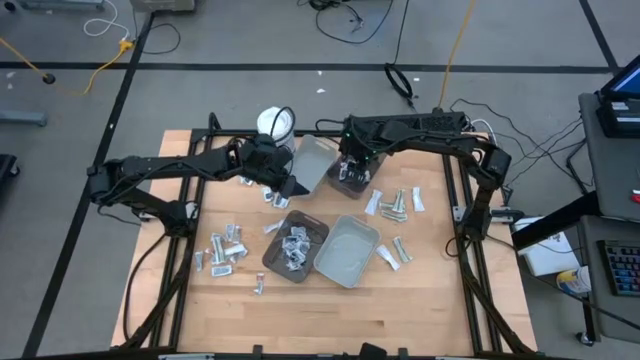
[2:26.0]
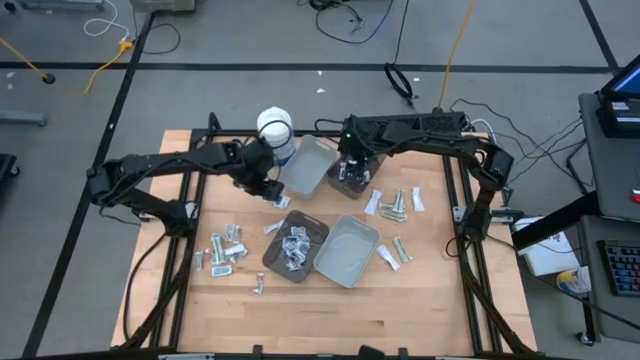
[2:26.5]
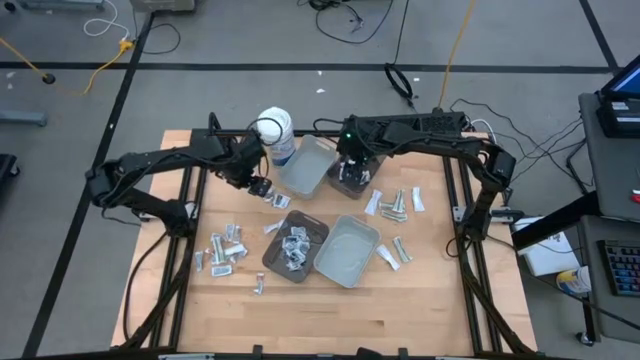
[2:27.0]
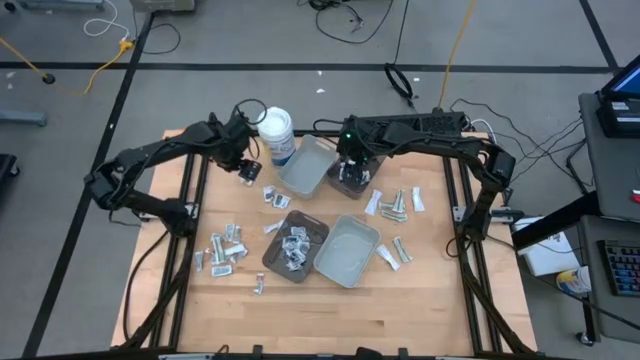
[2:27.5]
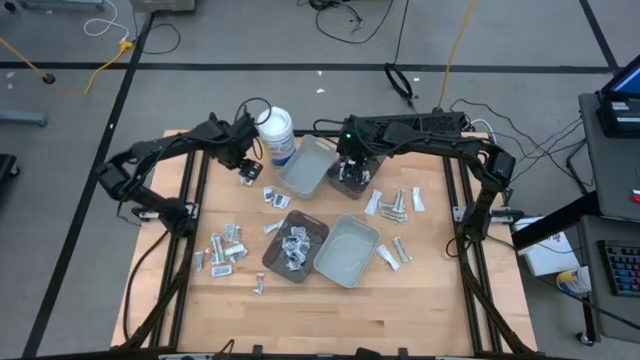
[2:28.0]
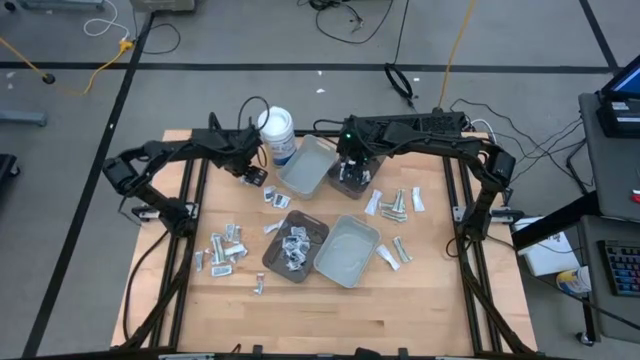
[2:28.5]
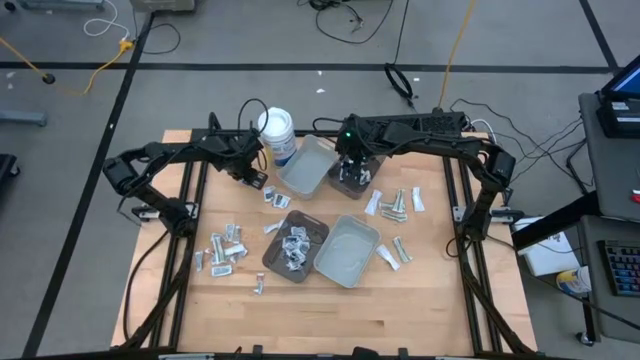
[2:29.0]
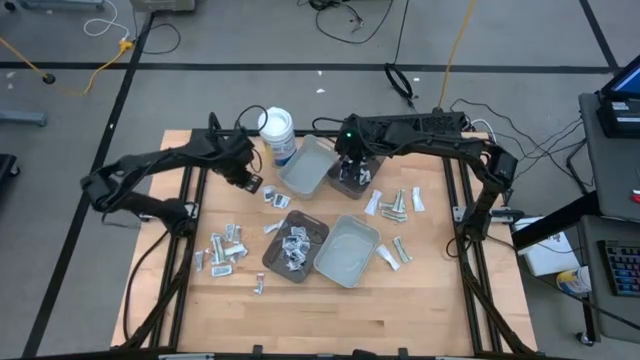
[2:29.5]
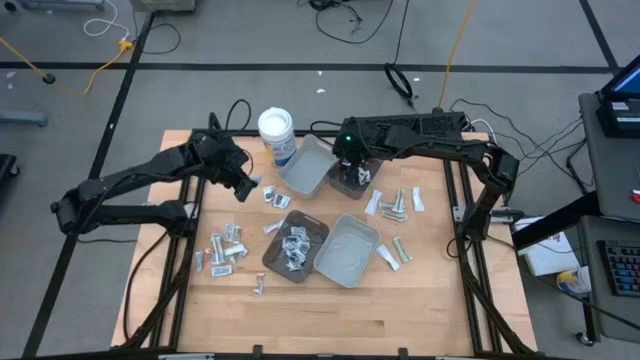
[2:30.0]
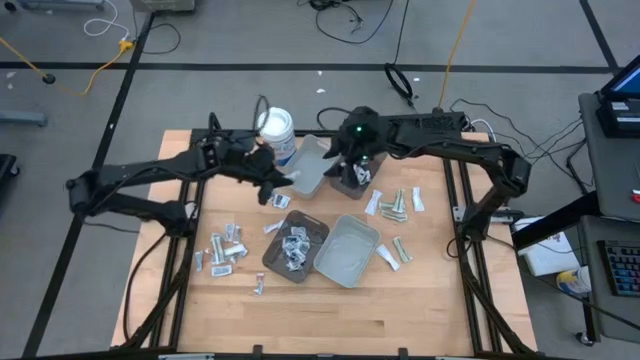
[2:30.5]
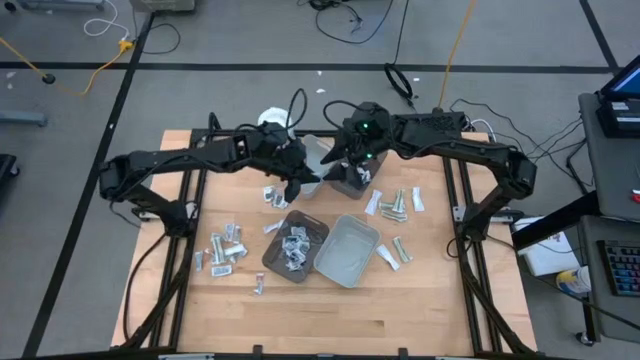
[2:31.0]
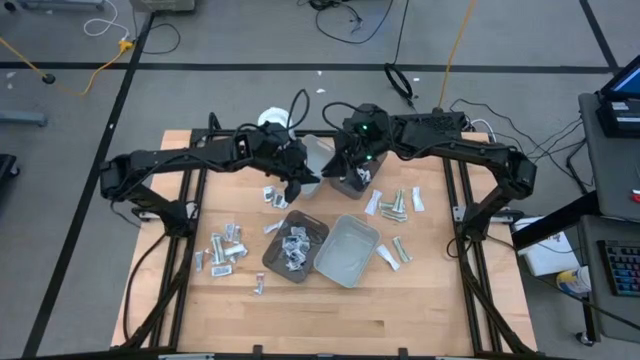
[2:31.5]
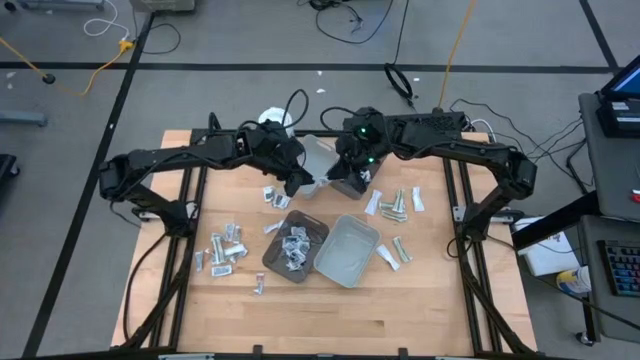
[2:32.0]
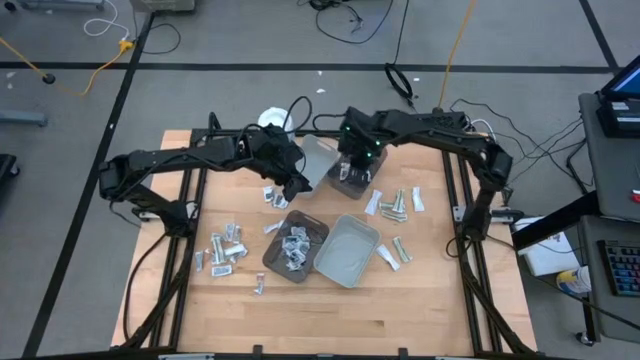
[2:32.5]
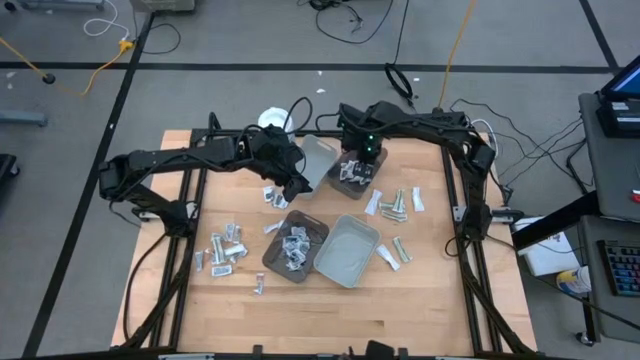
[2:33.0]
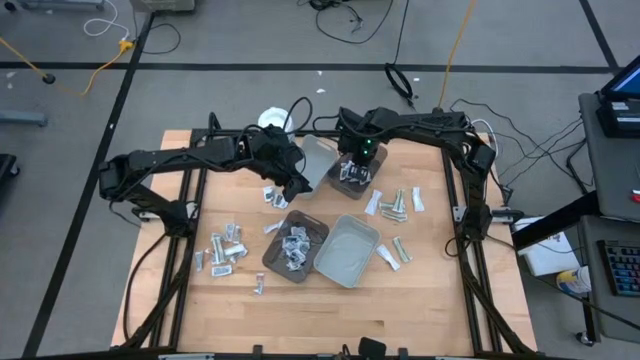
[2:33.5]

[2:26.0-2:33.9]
Task: Pick & Place First Aid Supplies
Put the black towelette pack into the top black bin

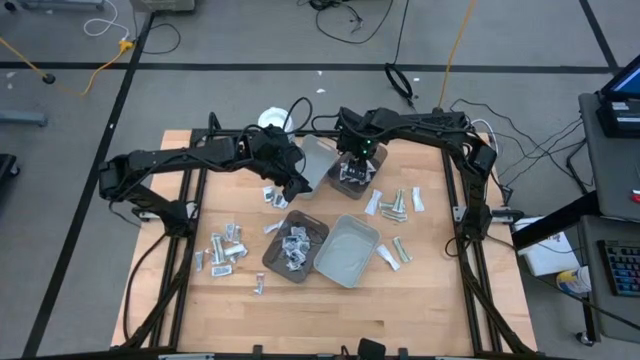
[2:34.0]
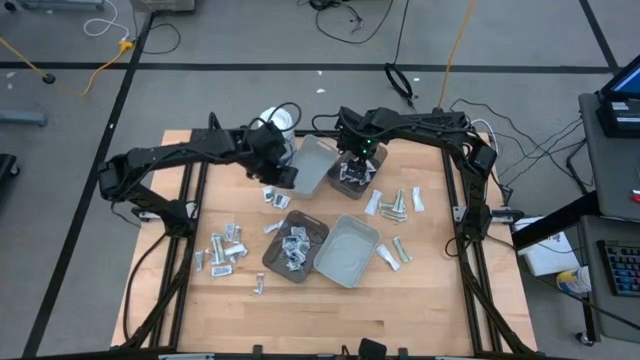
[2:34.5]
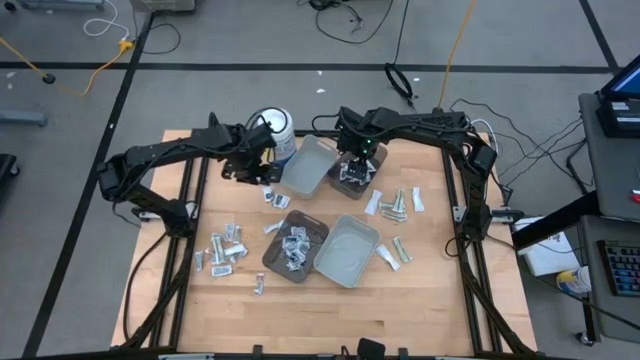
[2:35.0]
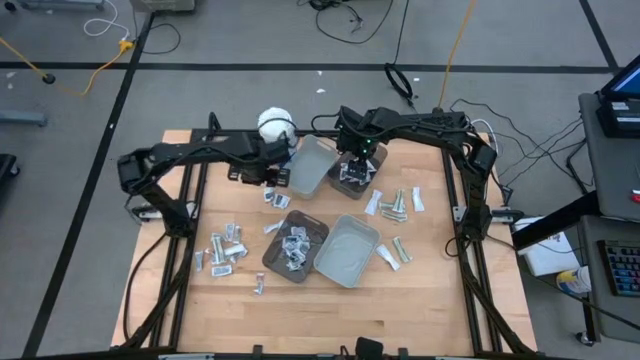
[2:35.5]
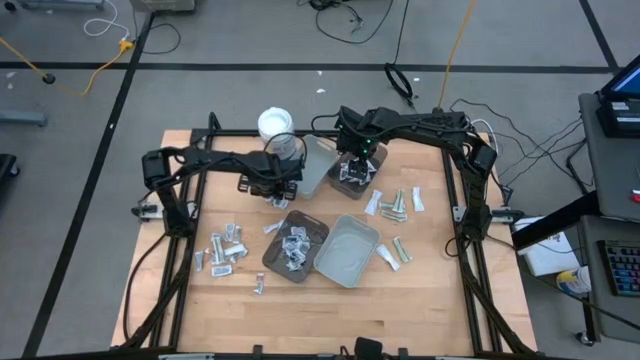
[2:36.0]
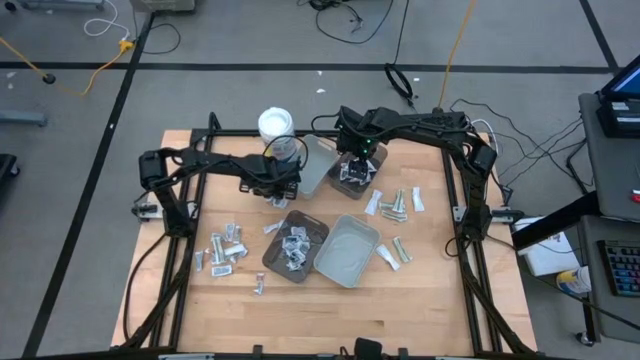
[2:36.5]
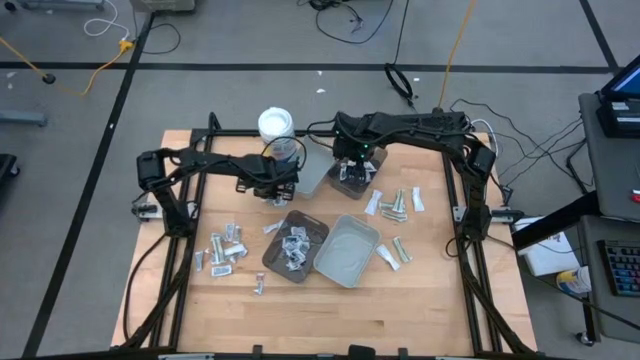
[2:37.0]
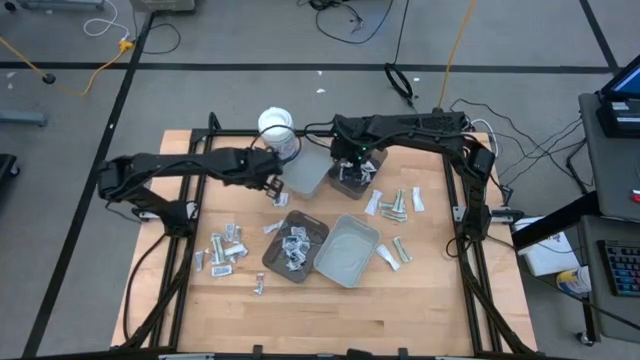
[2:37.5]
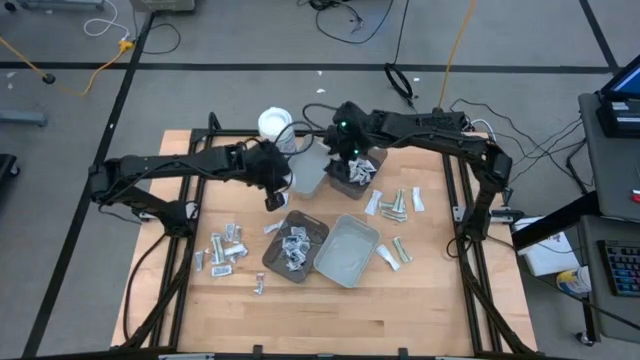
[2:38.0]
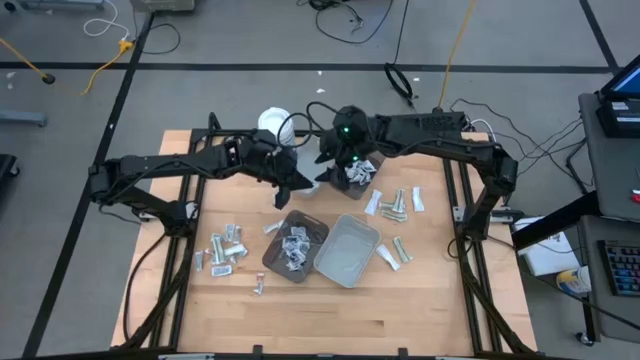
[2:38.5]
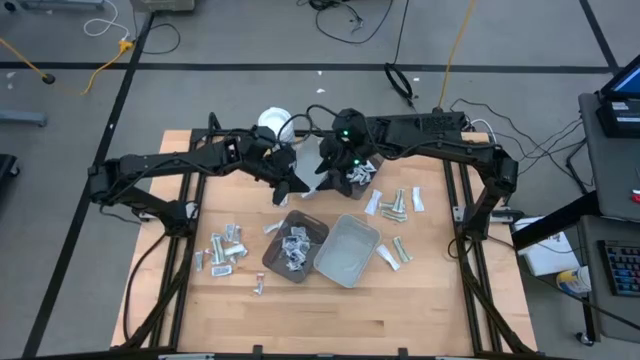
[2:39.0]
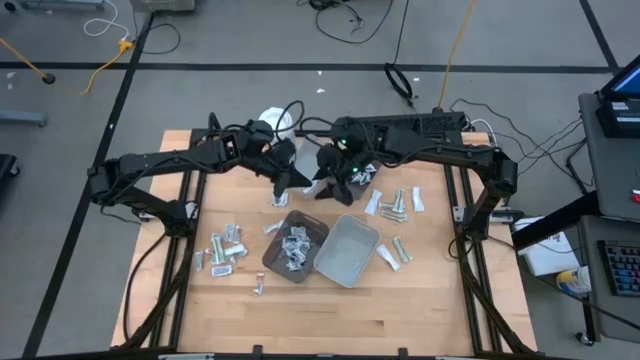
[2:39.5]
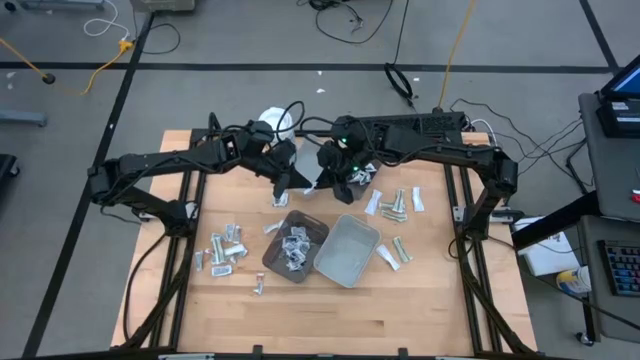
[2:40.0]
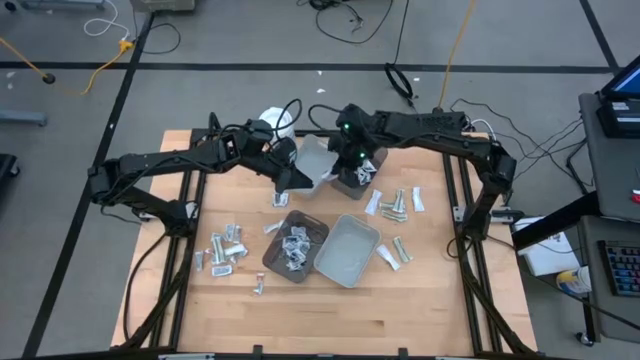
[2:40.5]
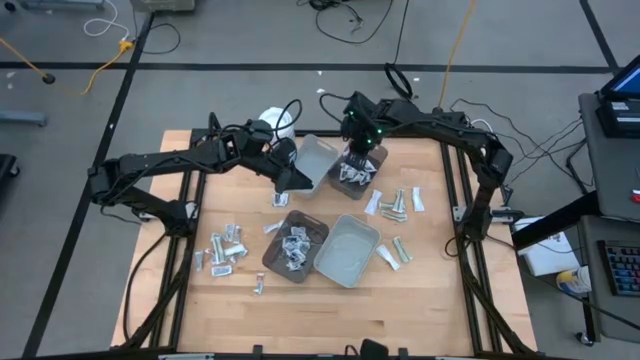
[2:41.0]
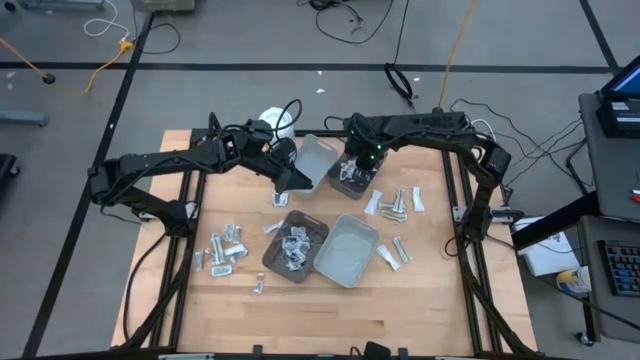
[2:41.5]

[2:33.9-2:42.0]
Put the black towelette pack into the top black bin

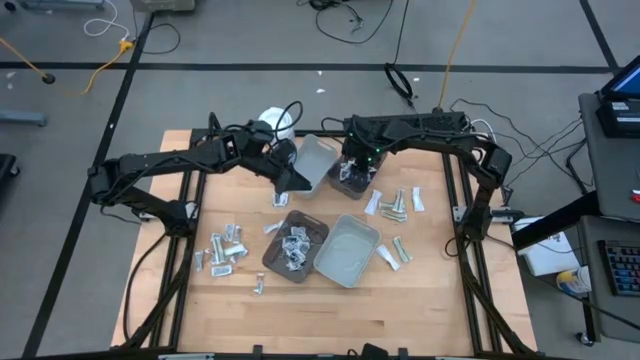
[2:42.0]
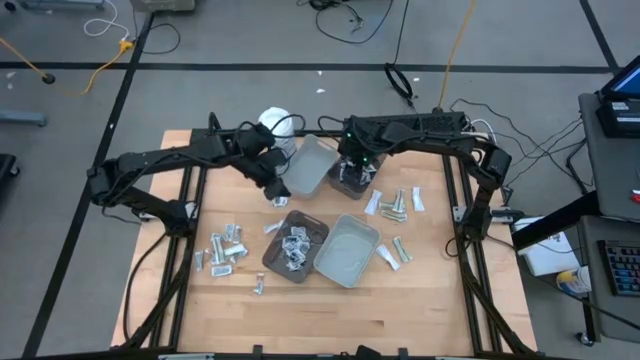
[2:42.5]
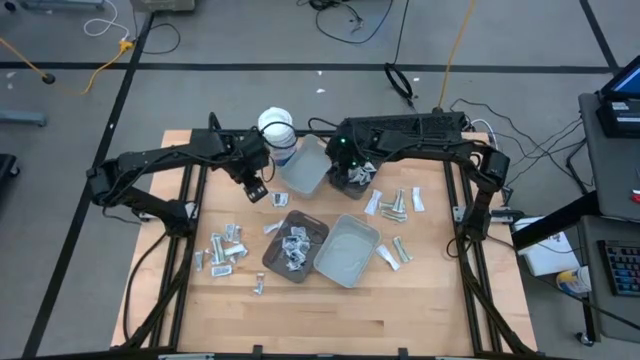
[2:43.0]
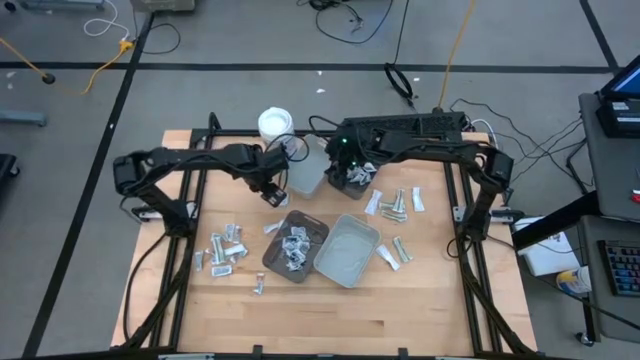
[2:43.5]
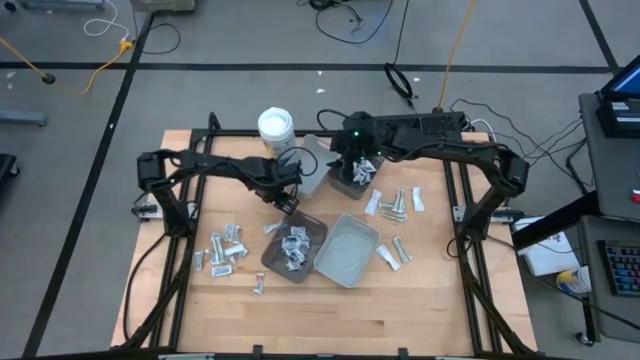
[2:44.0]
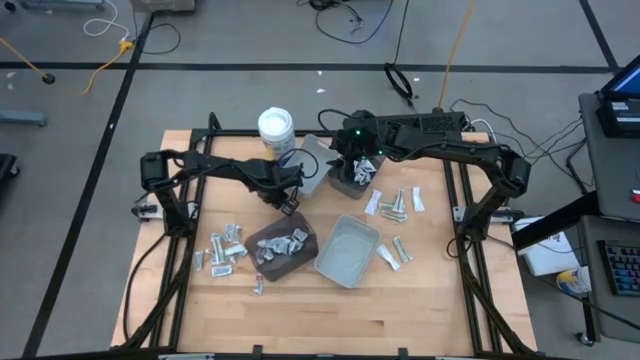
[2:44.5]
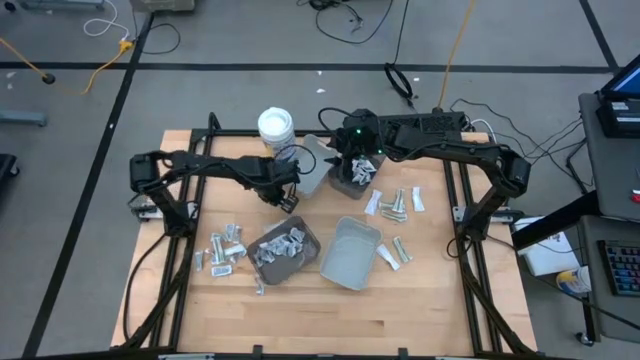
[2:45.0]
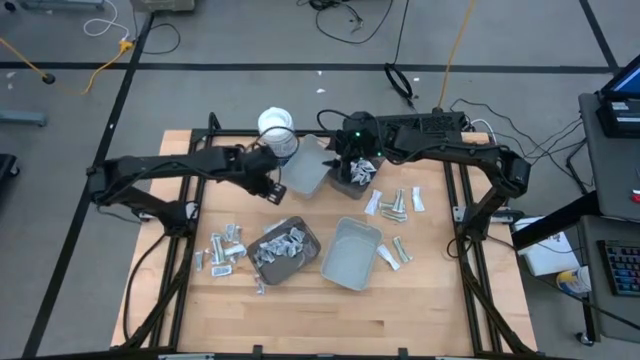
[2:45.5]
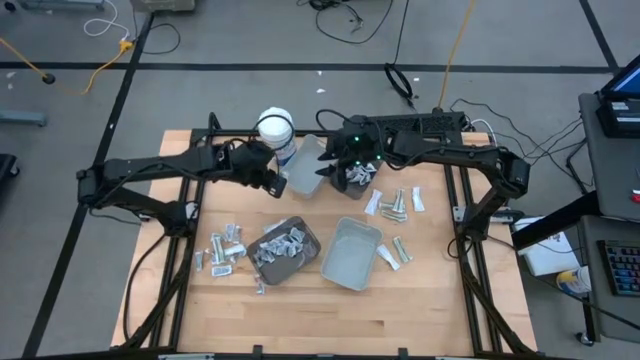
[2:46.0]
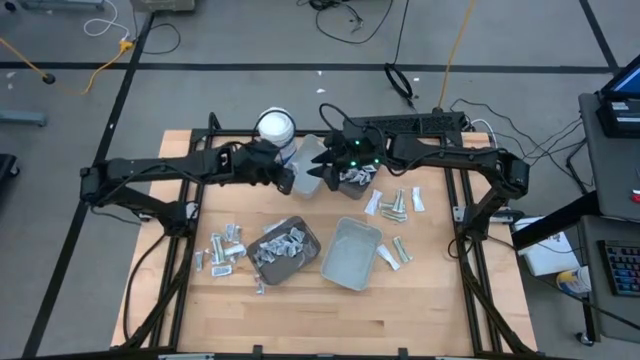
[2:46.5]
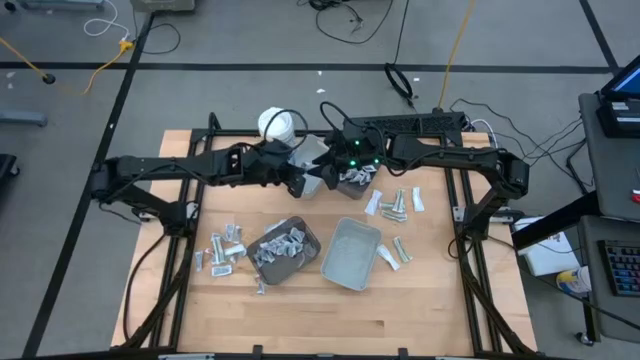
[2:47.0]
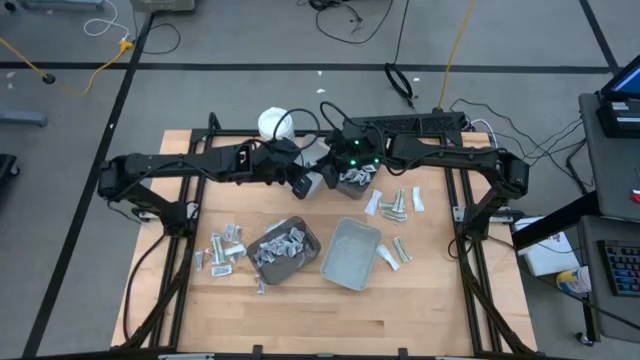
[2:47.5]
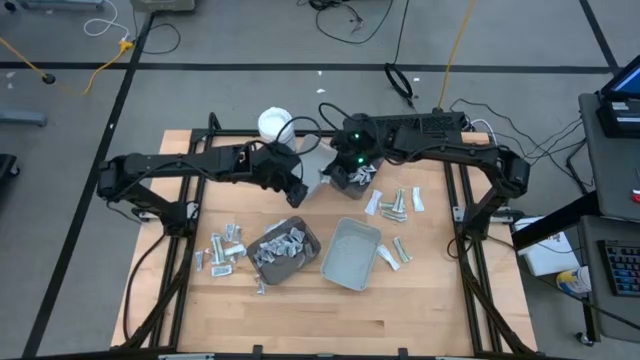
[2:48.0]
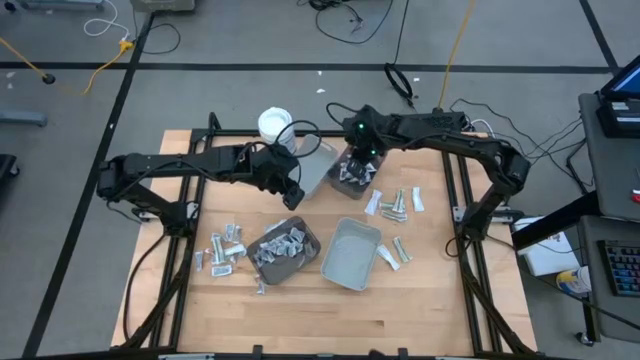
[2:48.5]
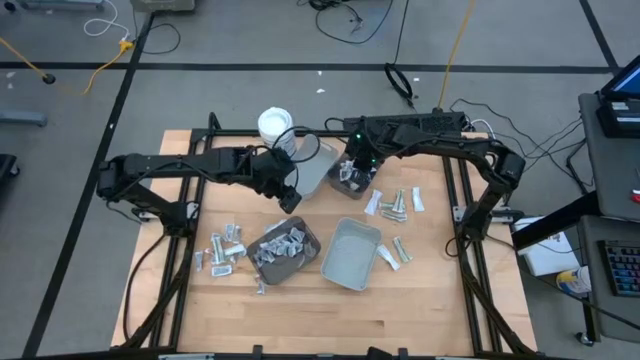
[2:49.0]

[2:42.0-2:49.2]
Put the black towelette pack into the top black bin
